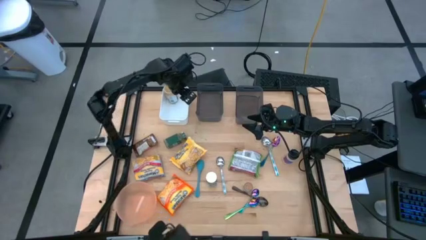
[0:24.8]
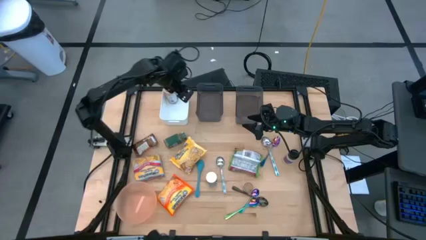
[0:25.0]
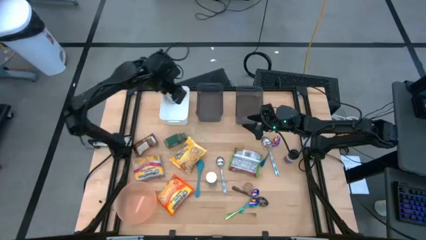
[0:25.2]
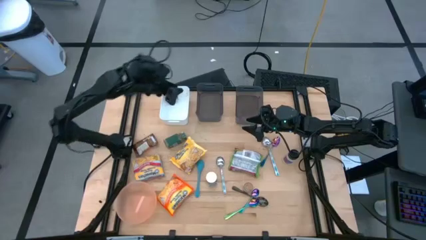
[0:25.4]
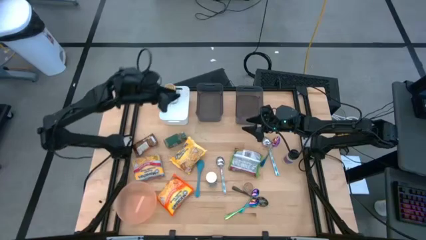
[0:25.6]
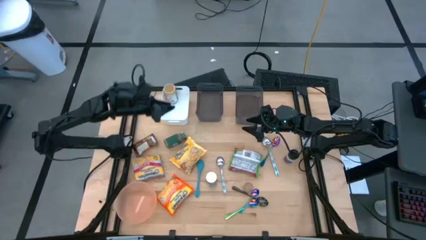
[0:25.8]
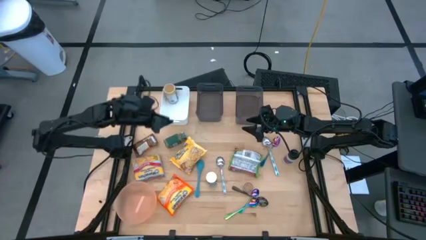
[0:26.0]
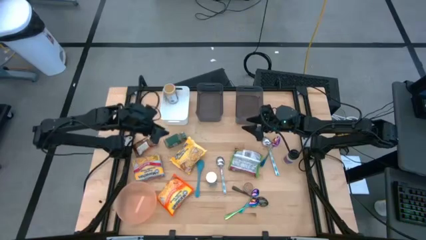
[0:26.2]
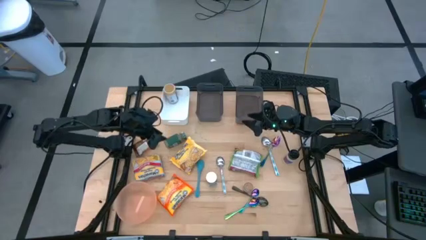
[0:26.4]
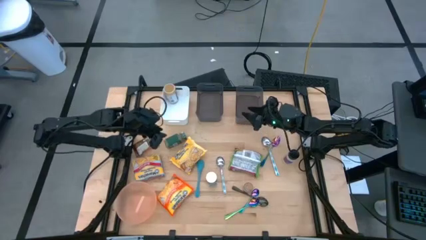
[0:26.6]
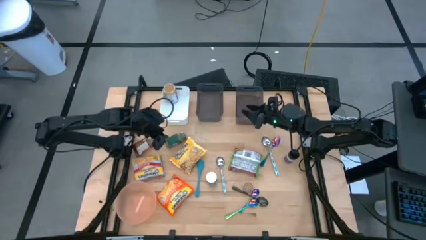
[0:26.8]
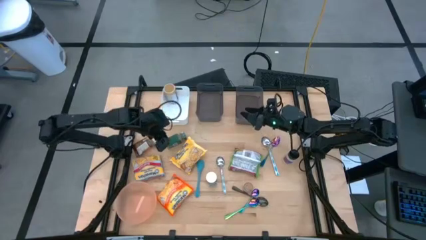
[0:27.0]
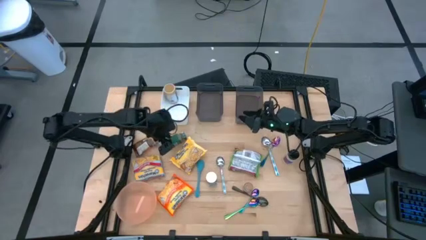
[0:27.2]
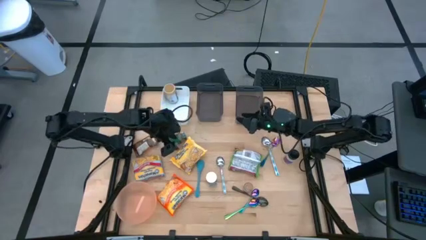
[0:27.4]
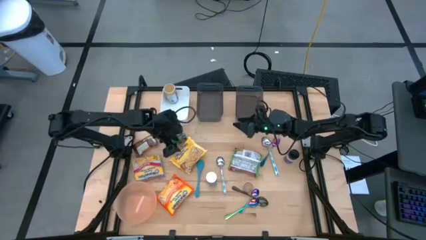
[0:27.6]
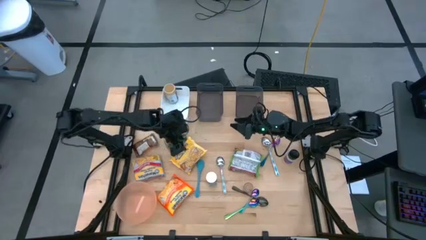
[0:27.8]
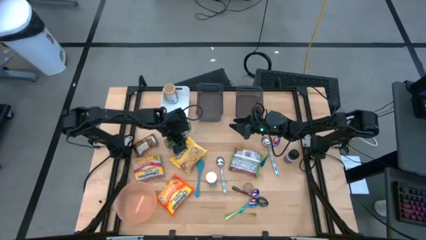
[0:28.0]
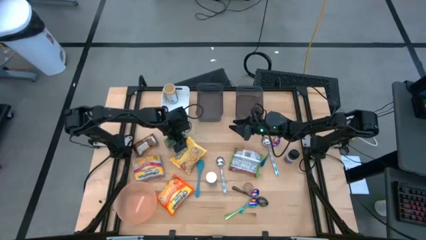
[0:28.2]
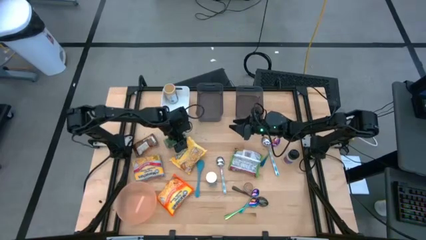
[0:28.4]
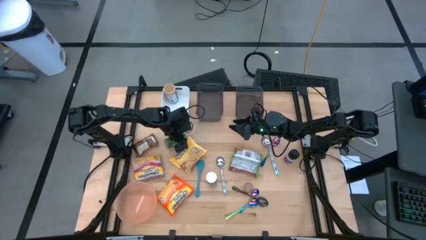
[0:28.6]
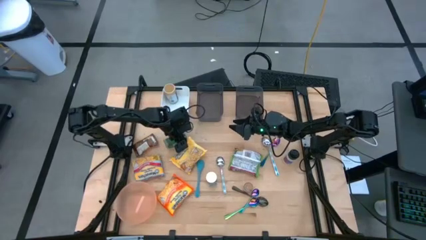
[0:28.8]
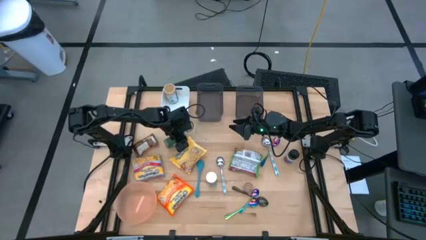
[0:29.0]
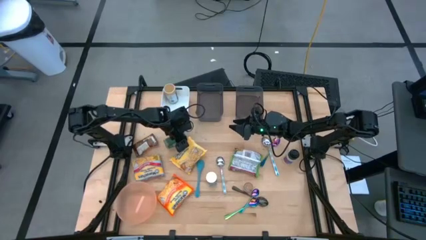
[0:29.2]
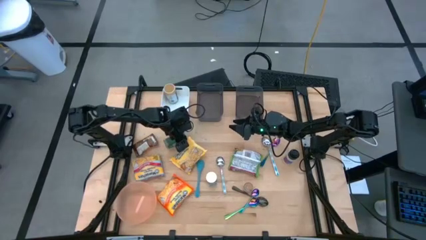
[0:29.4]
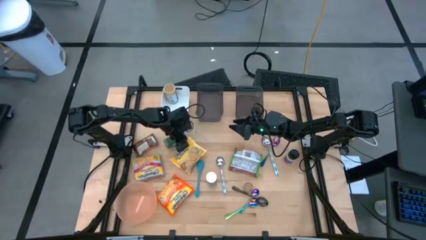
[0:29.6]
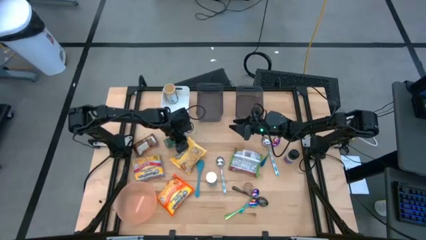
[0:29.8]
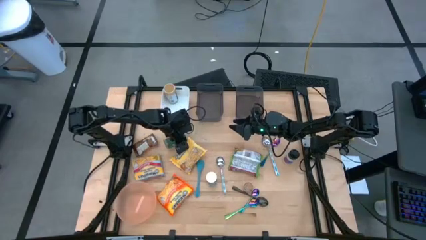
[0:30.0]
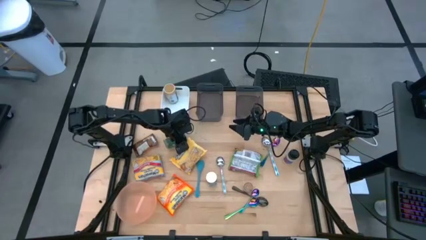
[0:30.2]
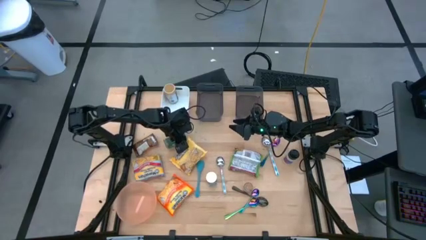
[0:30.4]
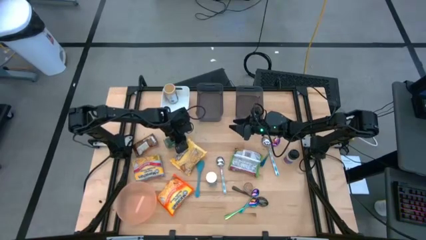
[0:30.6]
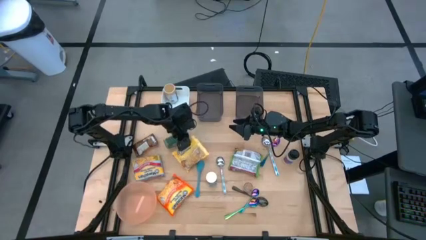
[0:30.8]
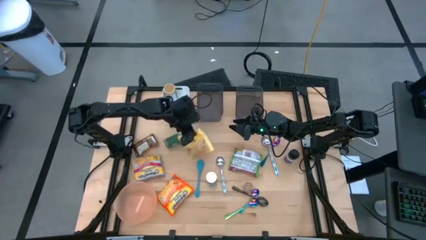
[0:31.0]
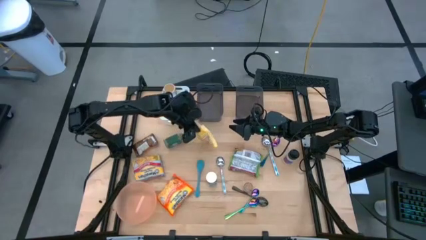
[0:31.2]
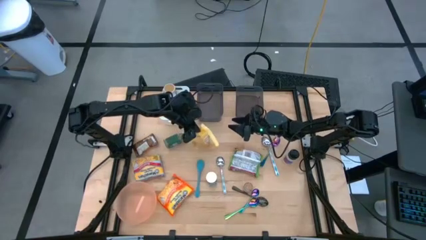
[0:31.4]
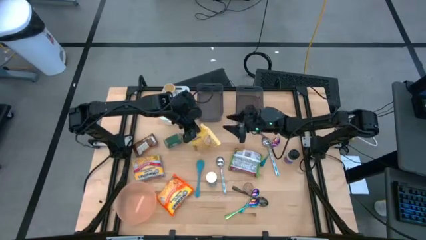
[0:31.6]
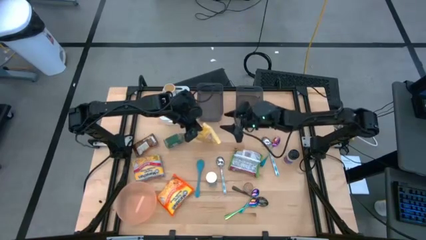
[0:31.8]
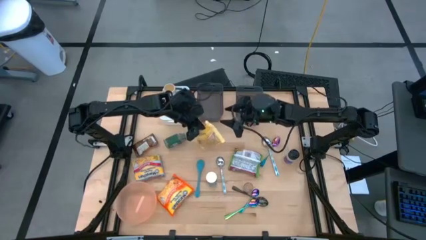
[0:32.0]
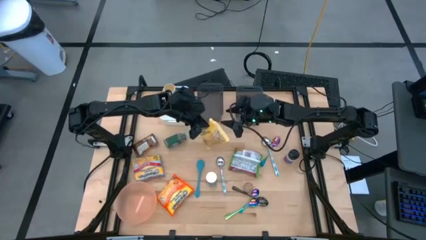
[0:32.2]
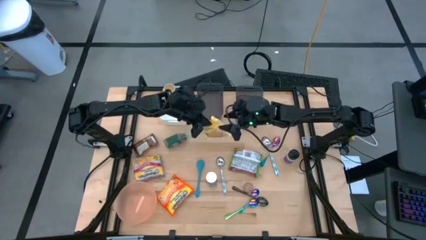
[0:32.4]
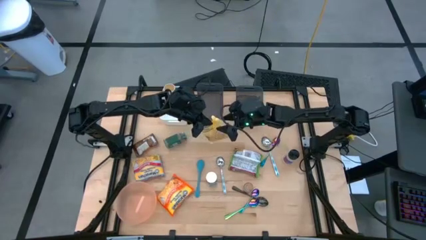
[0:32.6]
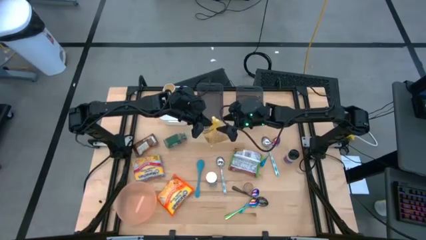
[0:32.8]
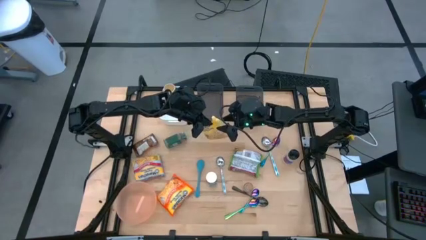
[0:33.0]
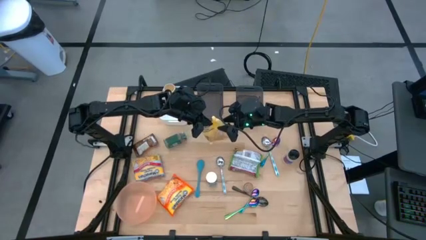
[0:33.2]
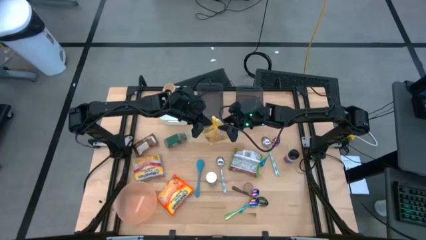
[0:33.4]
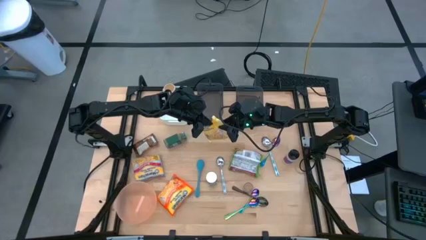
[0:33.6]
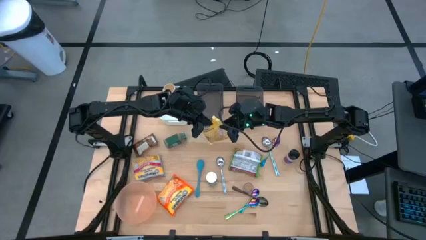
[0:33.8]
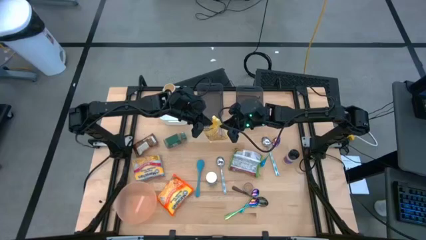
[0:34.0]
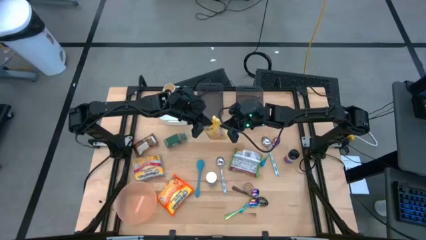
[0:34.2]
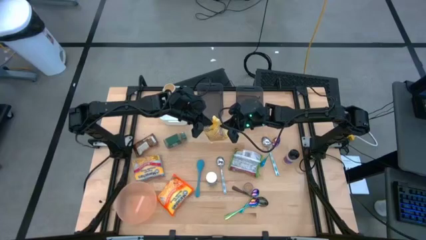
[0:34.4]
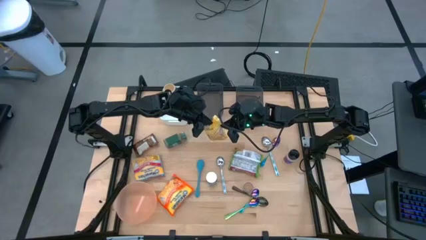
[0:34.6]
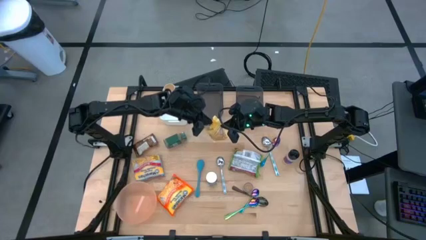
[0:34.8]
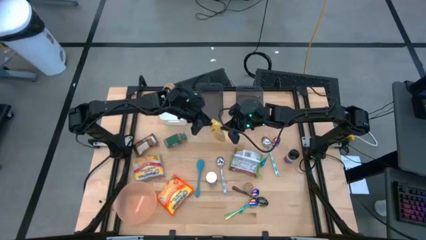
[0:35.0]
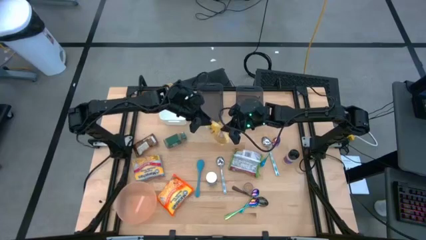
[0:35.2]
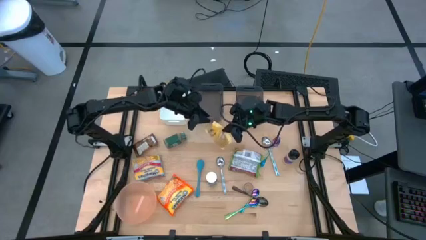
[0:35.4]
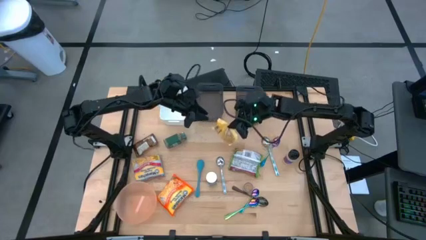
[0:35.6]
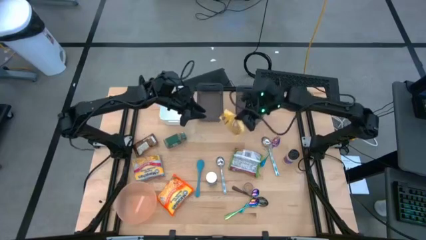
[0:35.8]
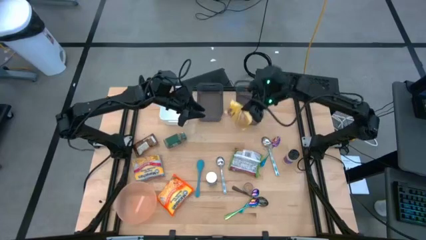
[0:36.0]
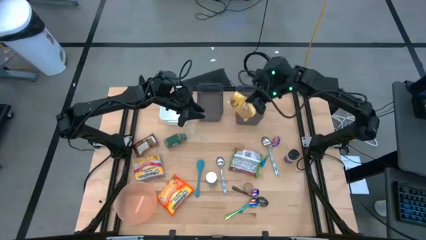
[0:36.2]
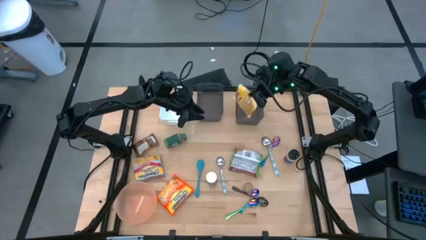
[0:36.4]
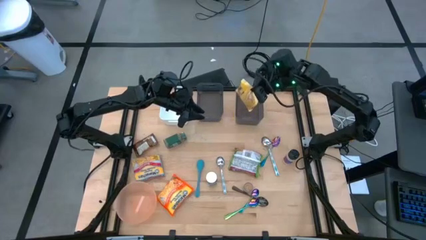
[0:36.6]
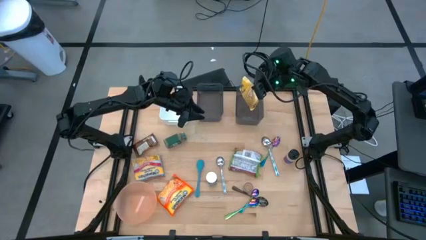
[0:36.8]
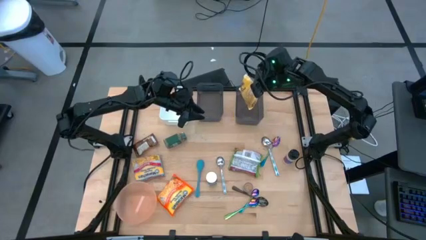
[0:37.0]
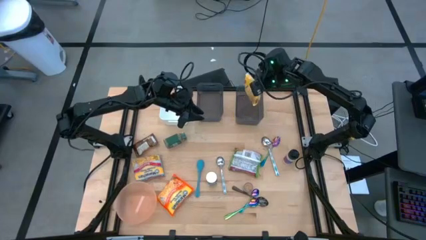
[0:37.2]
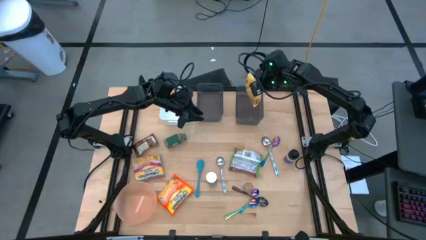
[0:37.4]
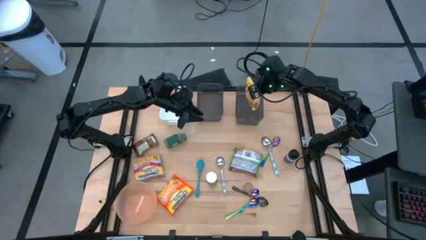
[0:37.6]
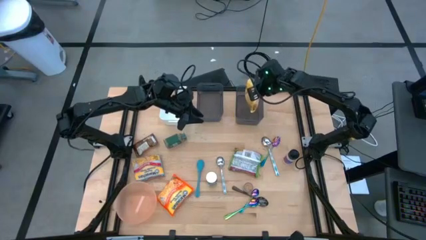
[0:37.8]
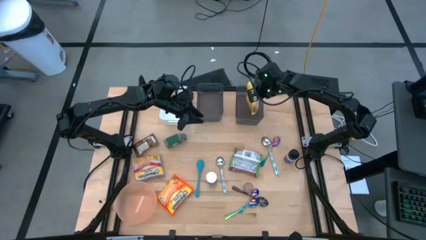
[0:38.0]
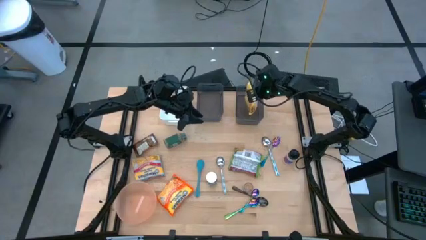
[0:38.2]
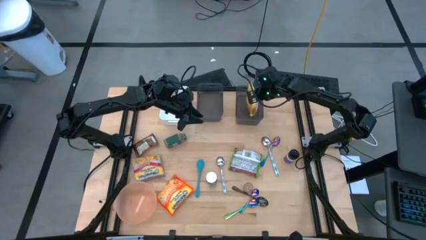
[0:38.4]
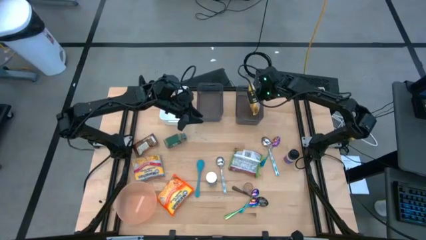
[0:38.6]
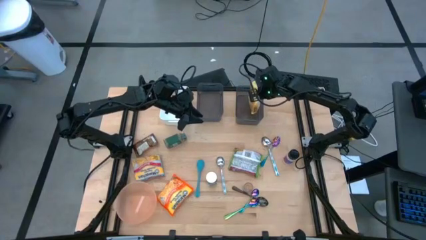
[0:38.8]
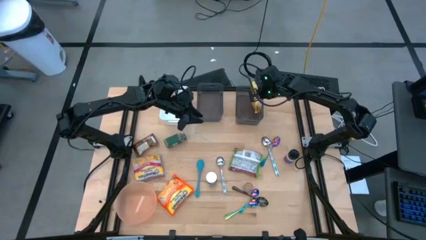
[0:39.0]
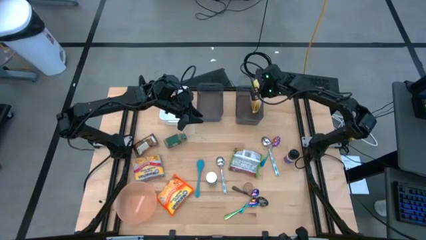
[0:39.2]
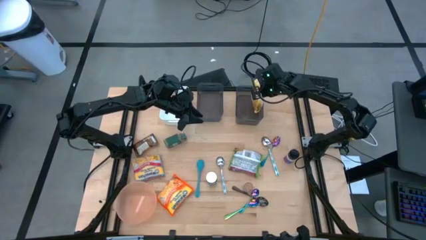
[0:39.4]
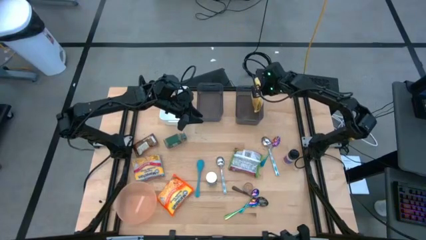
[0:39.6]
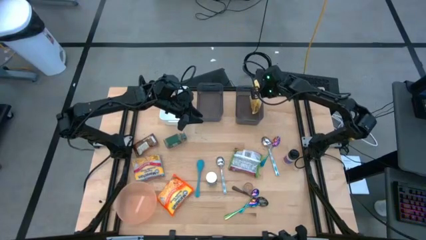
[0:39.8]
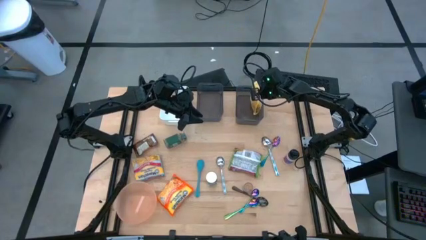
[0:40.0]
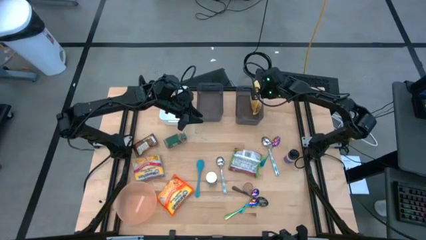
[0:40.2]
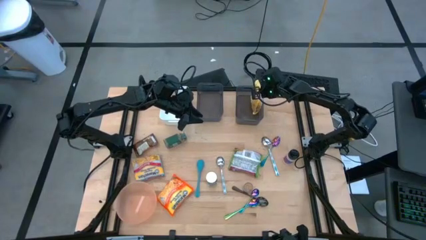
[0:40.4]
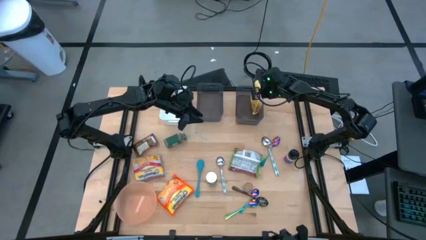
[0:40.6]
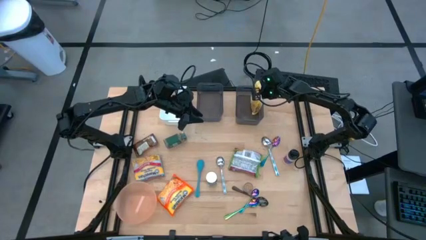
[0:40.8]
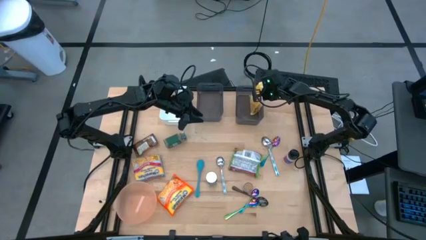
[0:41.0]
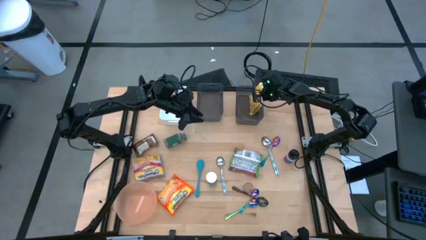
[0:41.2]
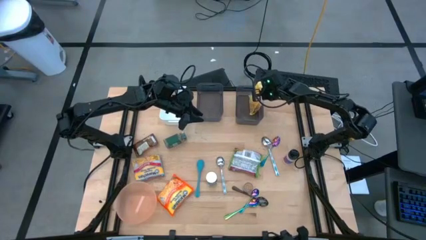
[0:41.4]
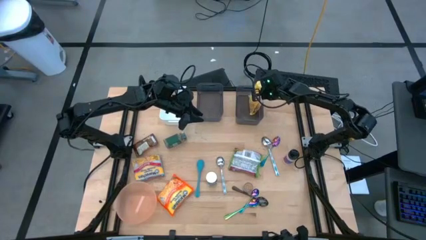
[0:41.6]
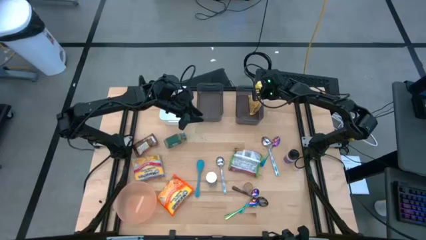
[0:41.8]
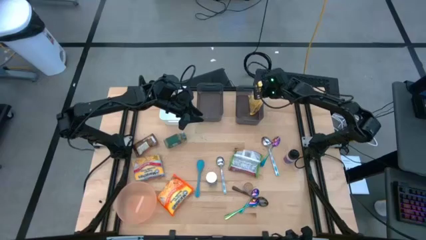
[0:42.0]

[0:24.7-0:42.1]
Task: Pick & Place Food Item
Put the yellow noodle pack into the right black bin
